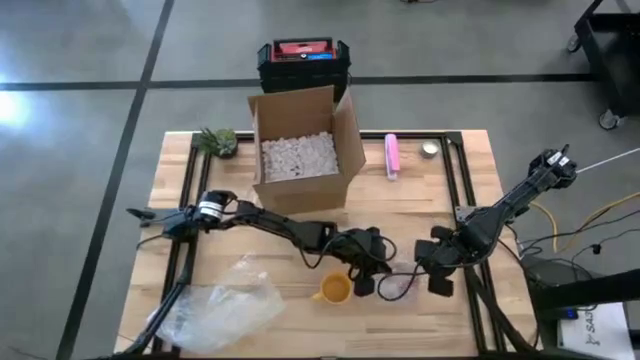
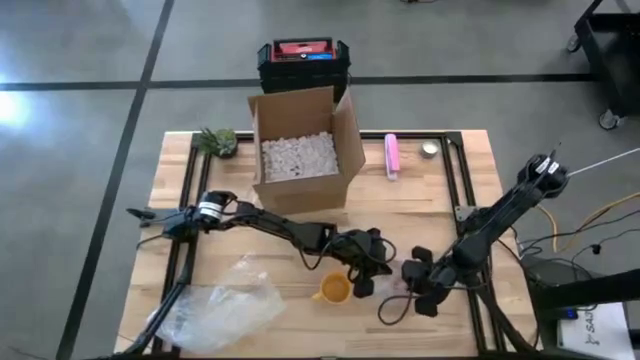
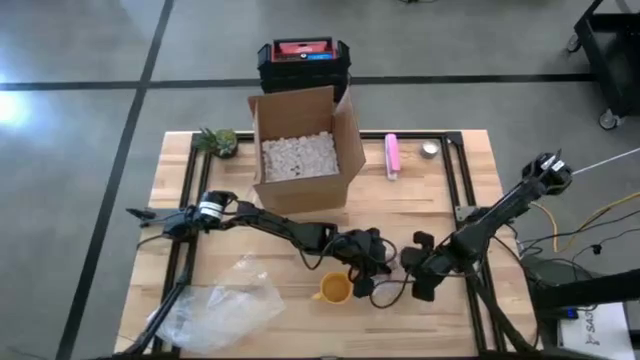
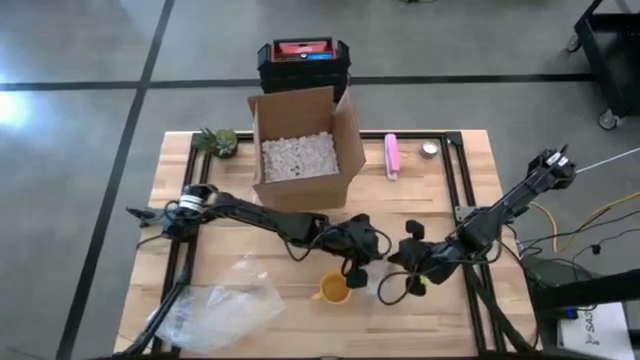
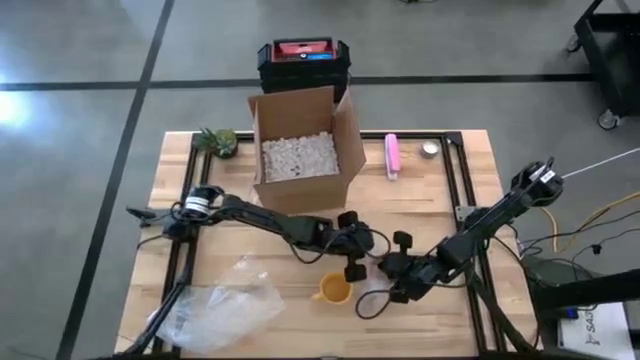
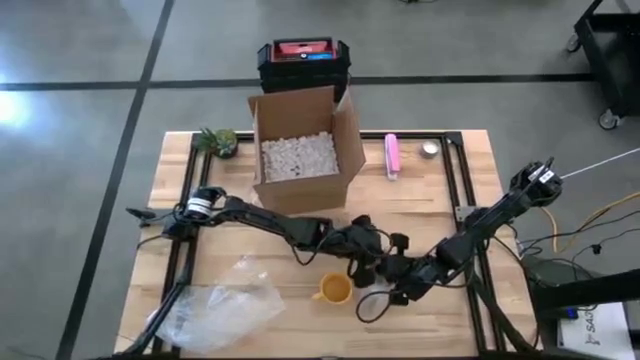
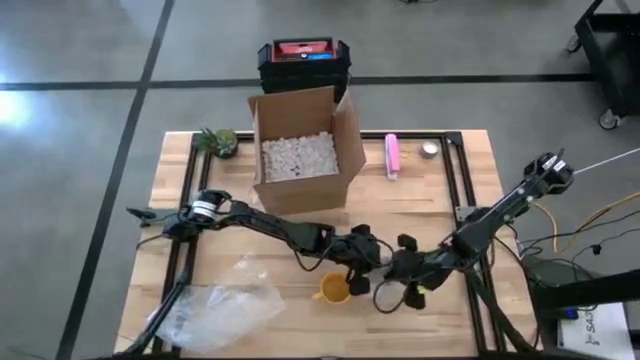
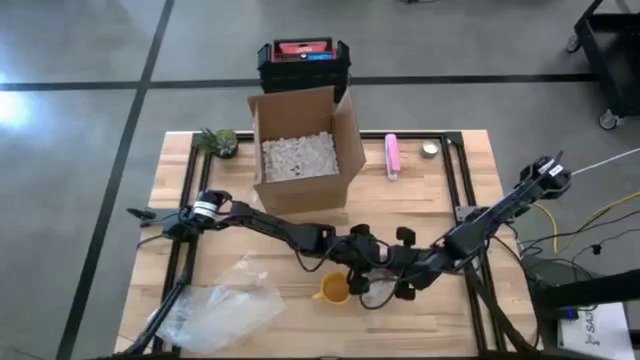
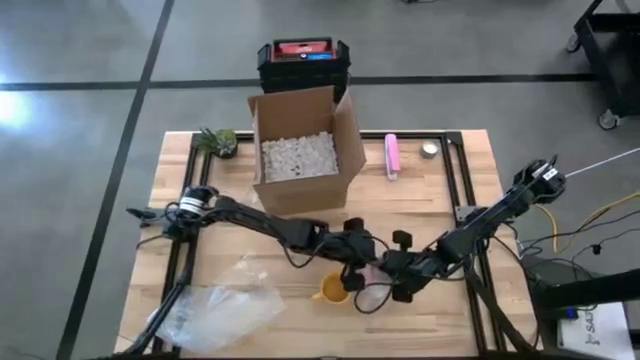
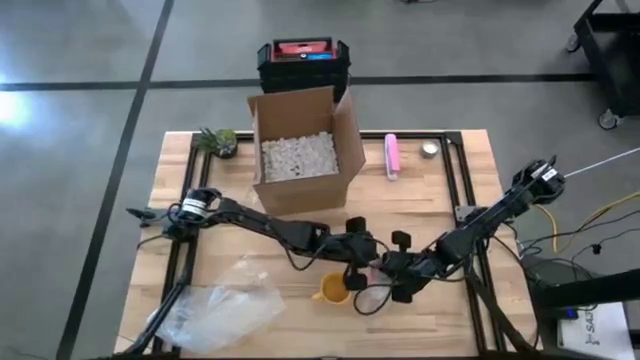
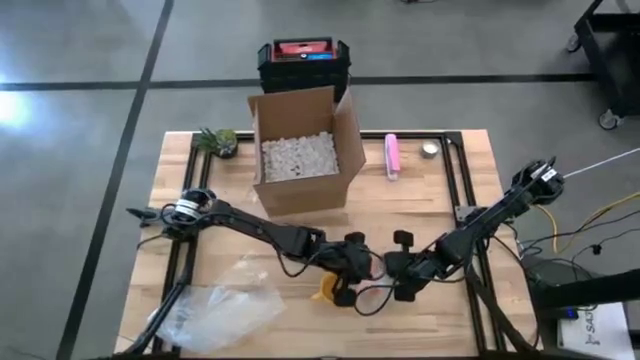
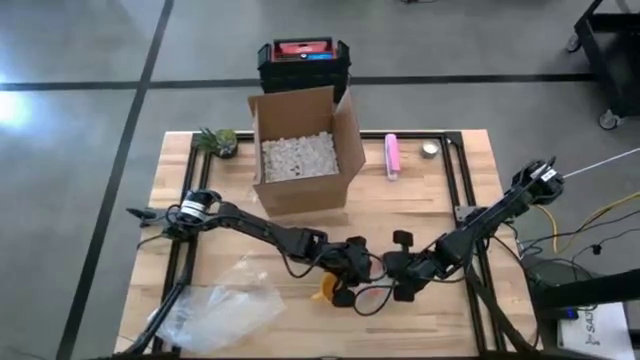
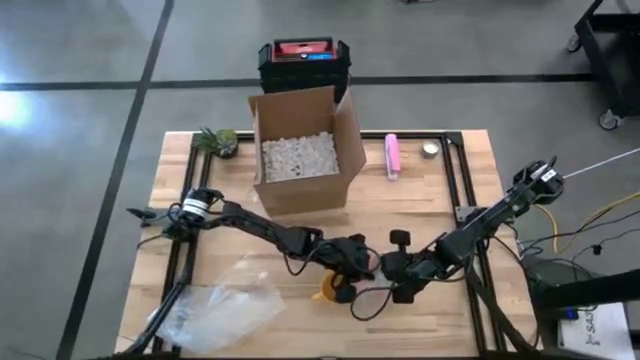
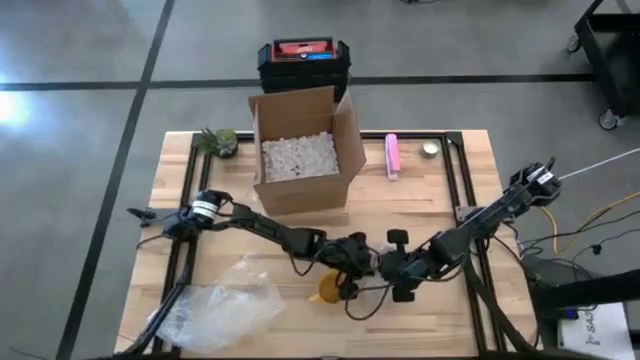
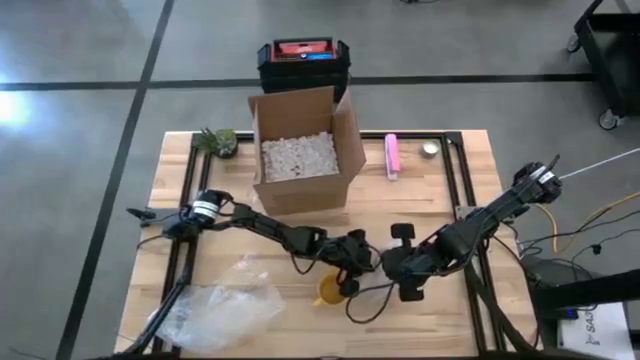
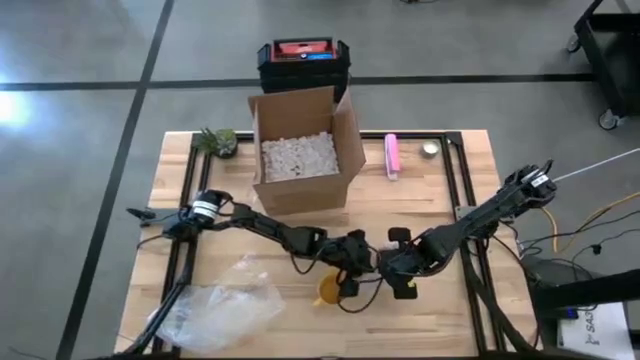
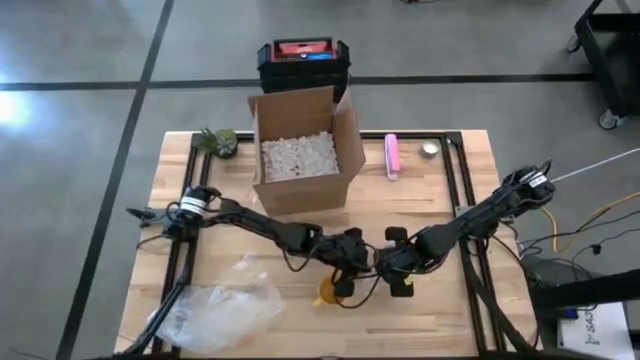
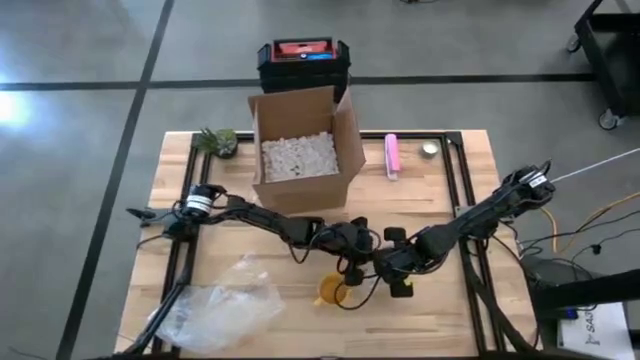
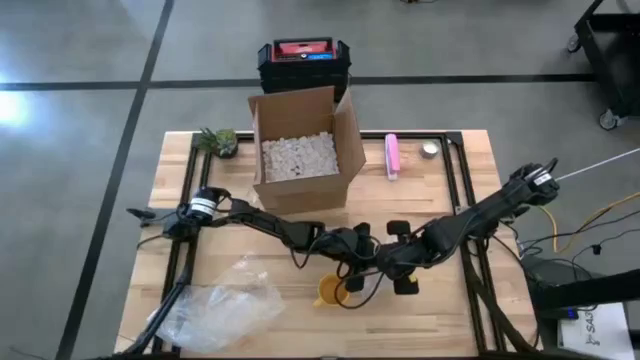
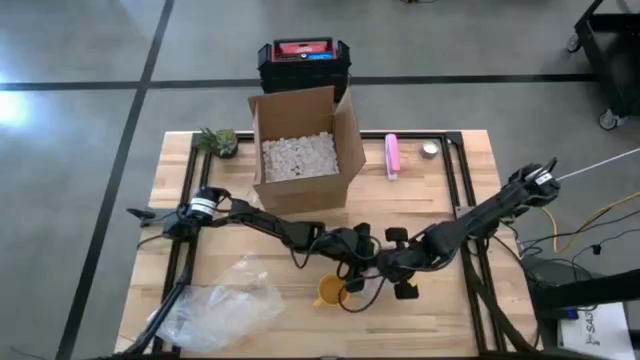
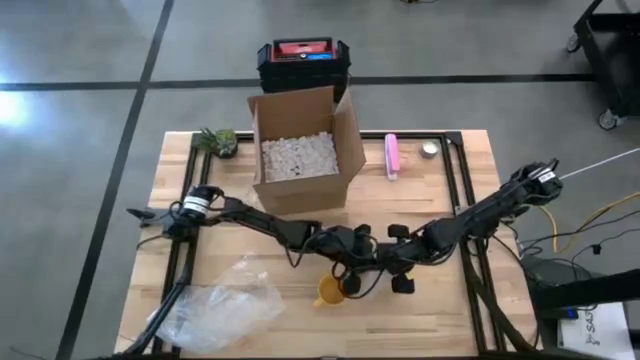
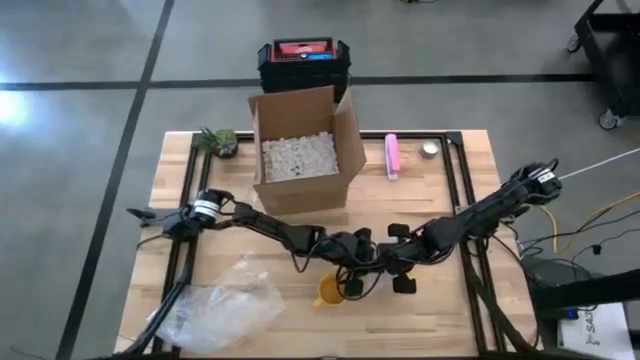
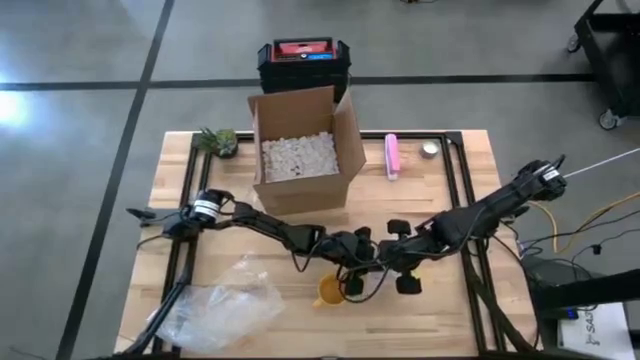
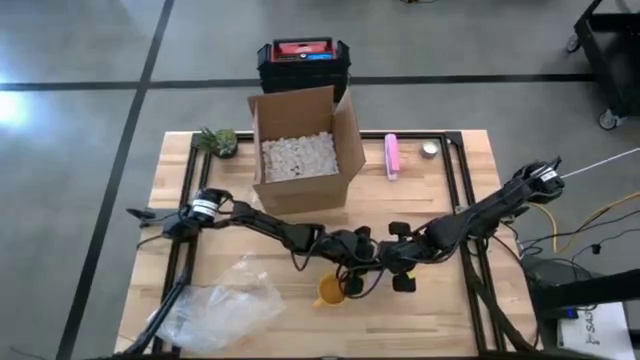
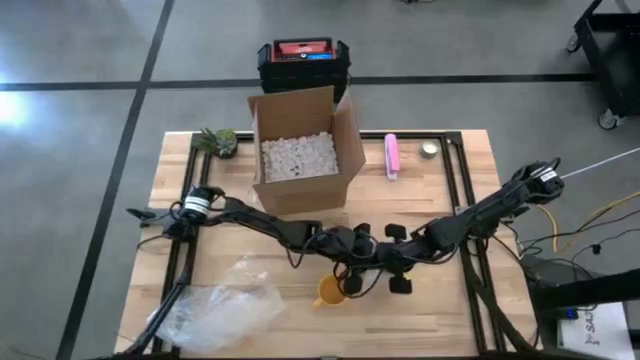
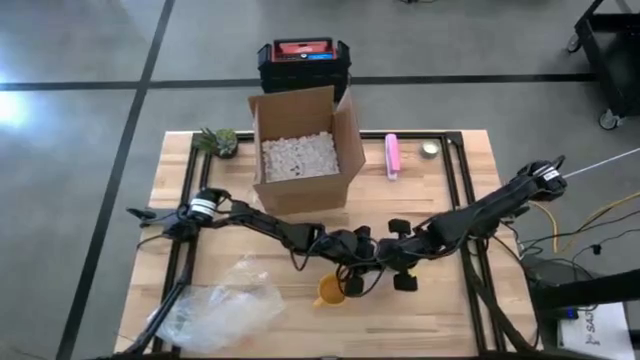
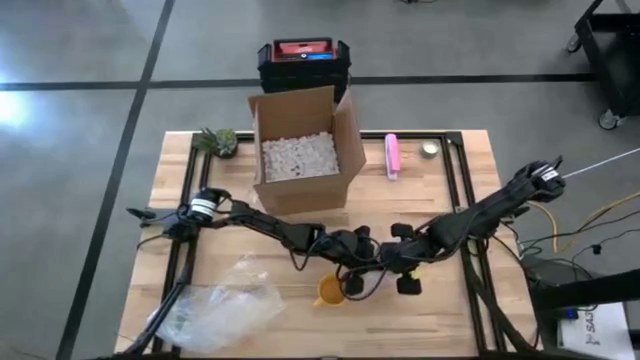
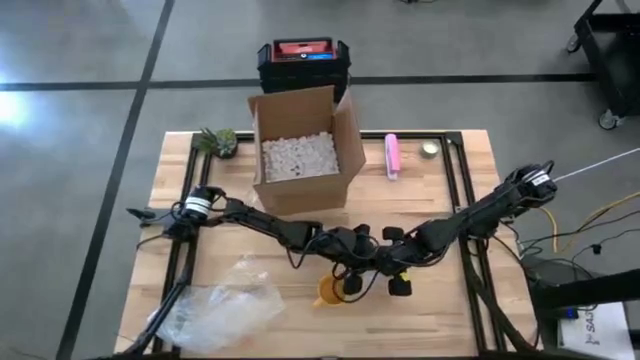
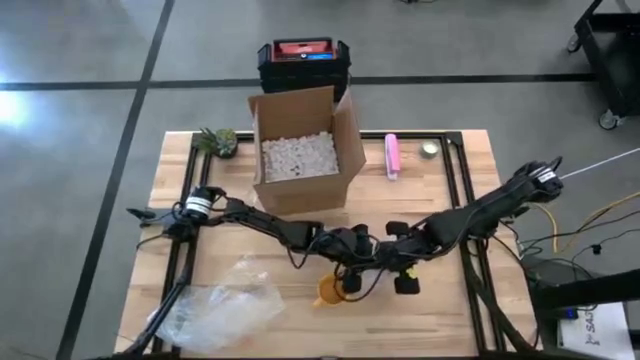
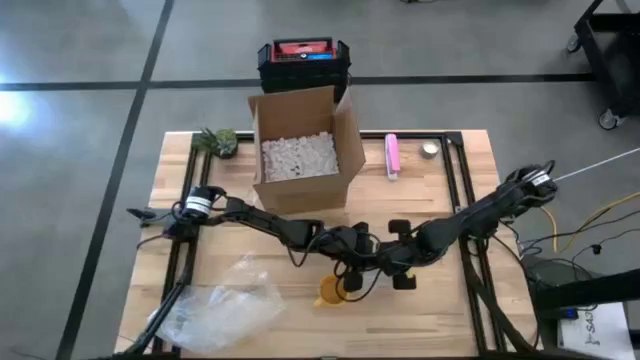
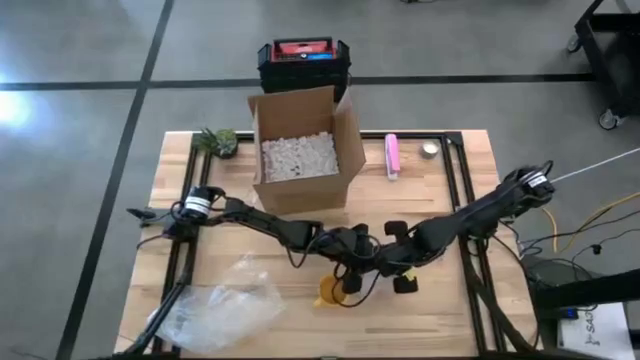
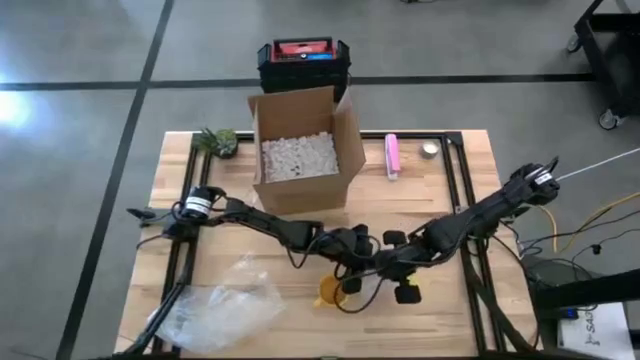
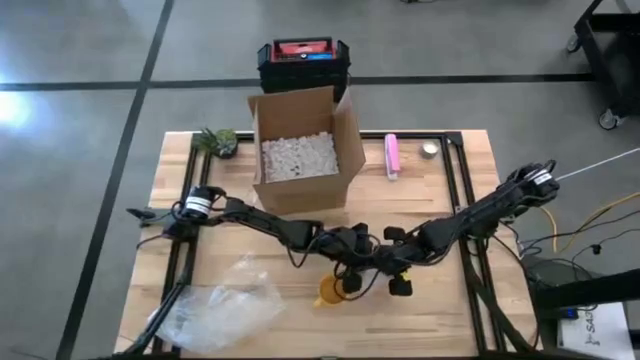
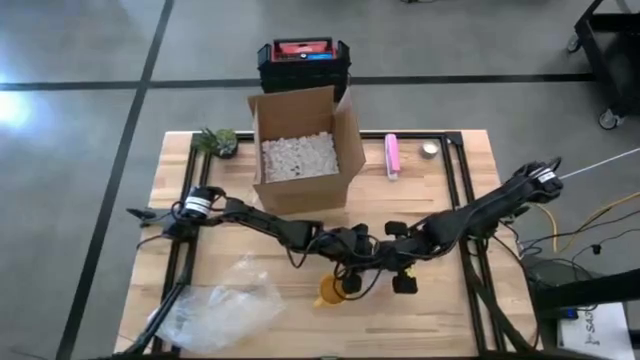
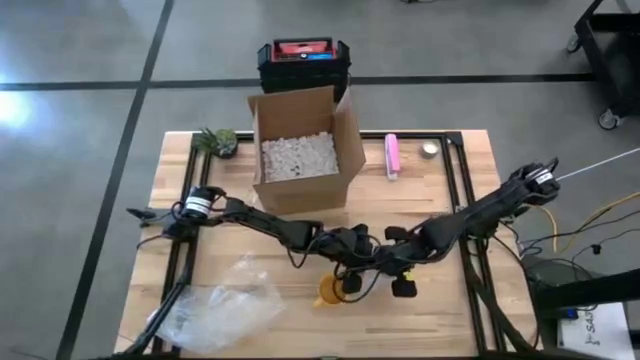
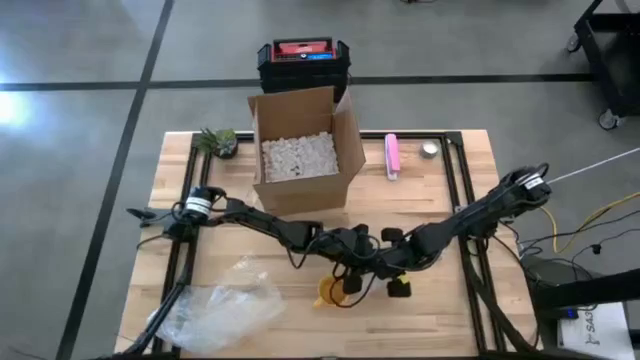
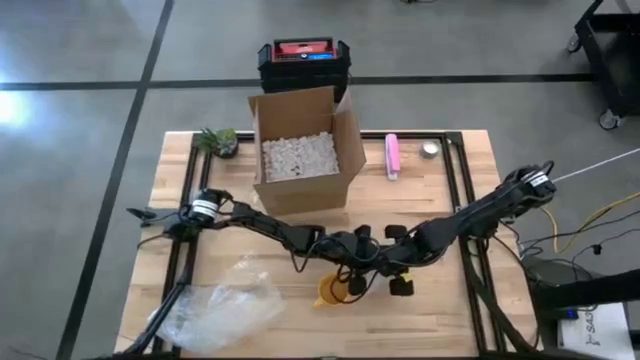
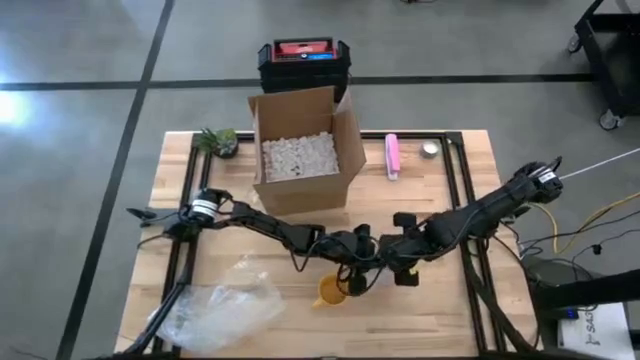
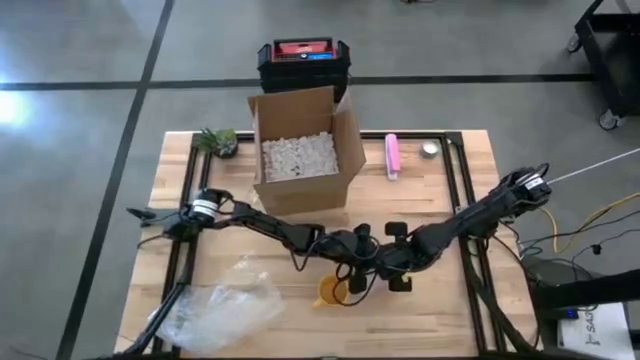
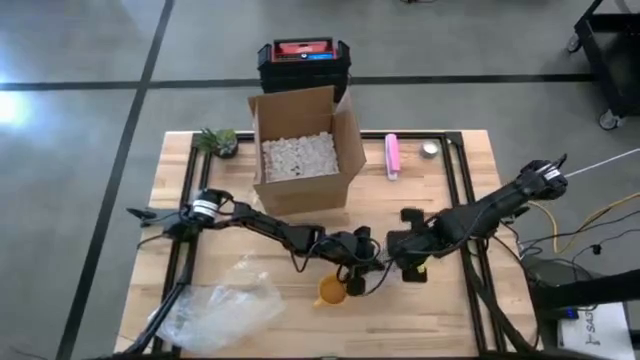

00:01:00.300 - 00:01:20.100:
Task: wrap mug
Wrap the orange mug in the right transparent bubble wrap

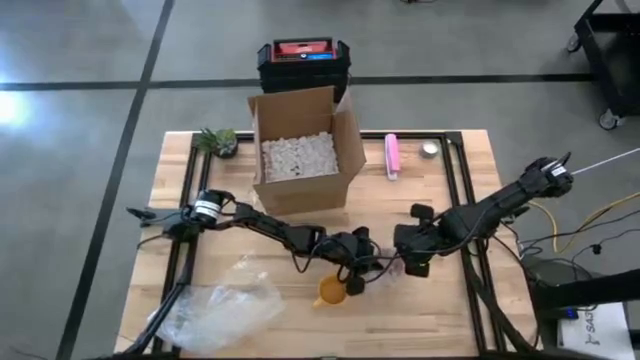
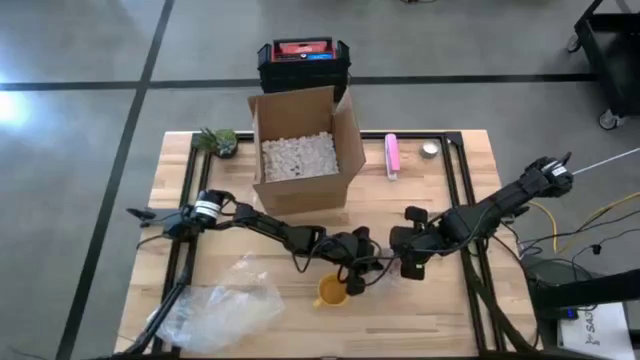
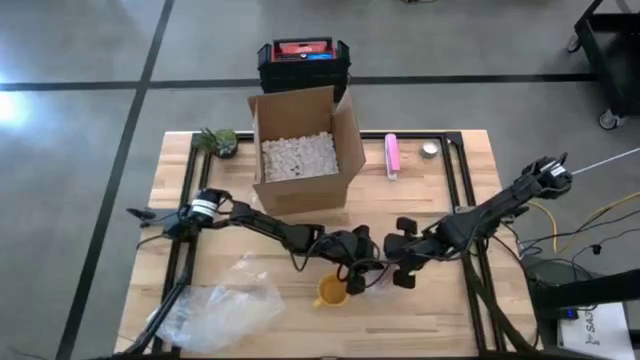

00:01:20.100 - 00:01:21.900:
Wrap the orange mug in the right transparent bubble wrap

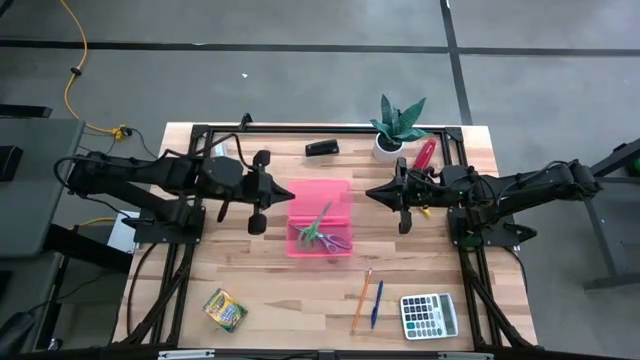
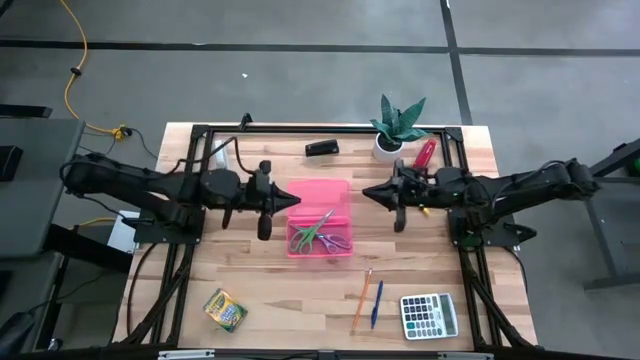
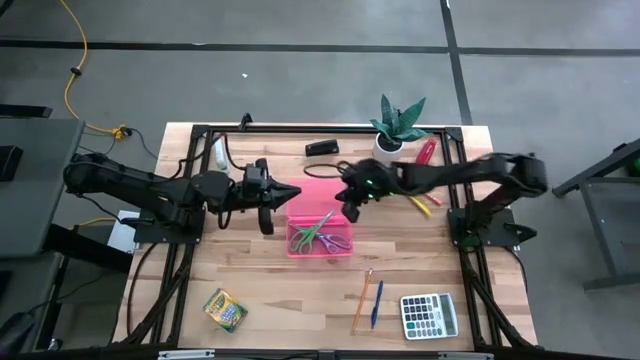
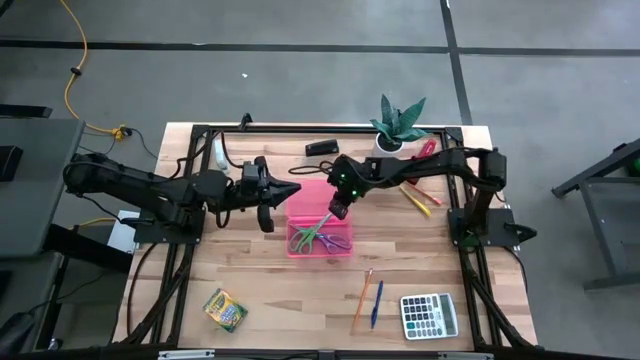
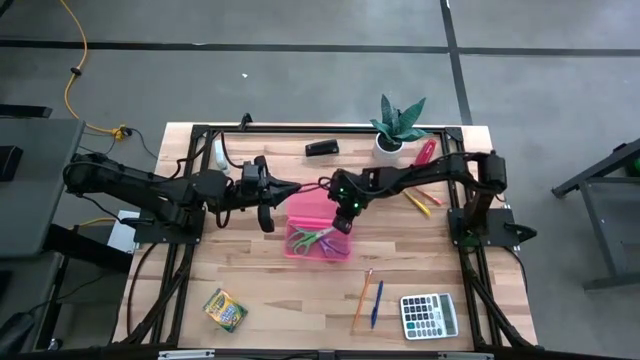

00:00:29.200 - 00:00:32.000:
Task: Pick & place school supplies into a supply box
Put the green scissors into the pink supply box
